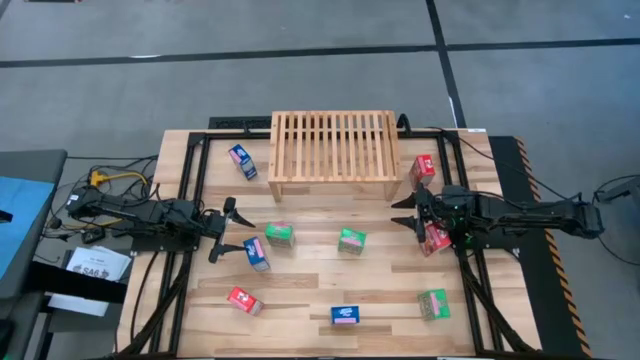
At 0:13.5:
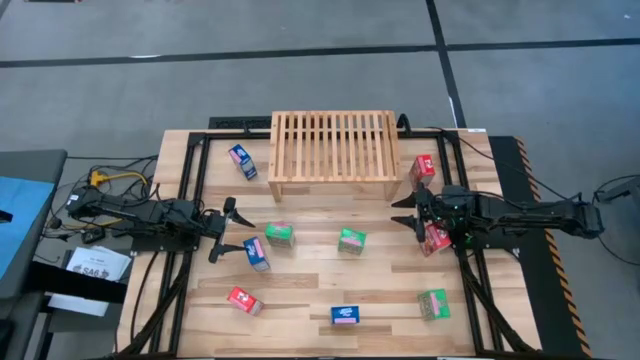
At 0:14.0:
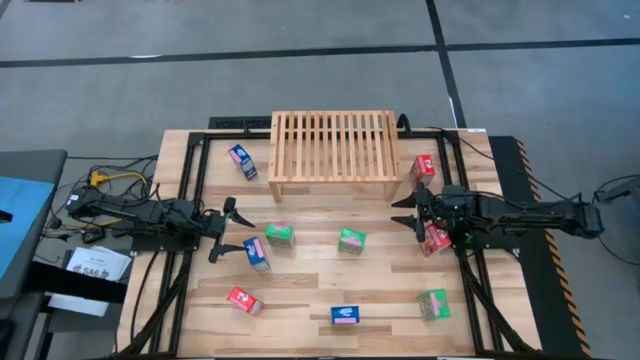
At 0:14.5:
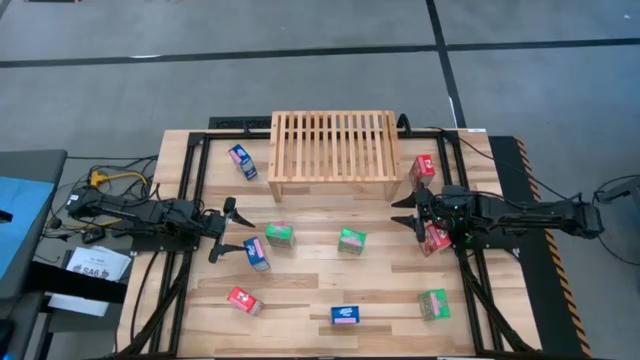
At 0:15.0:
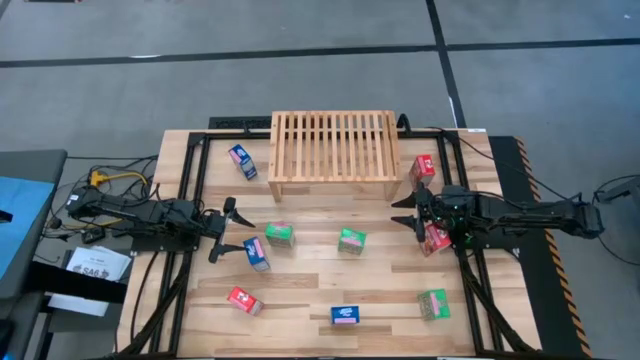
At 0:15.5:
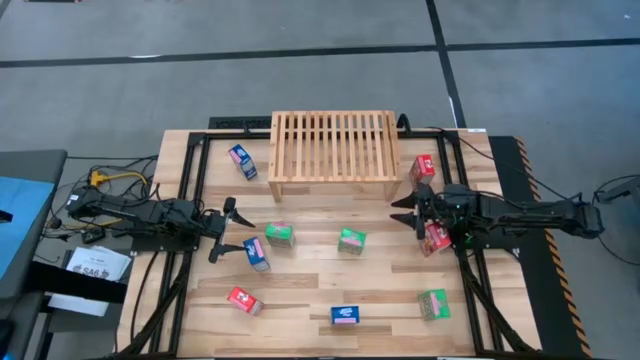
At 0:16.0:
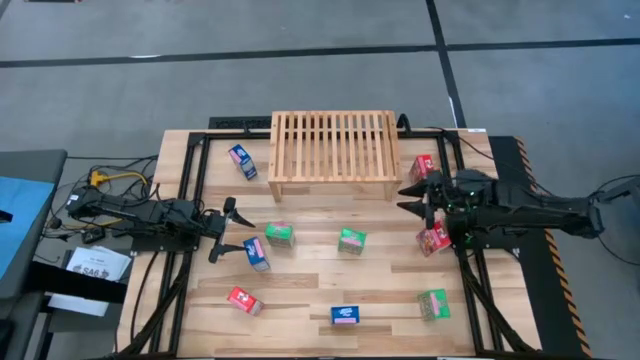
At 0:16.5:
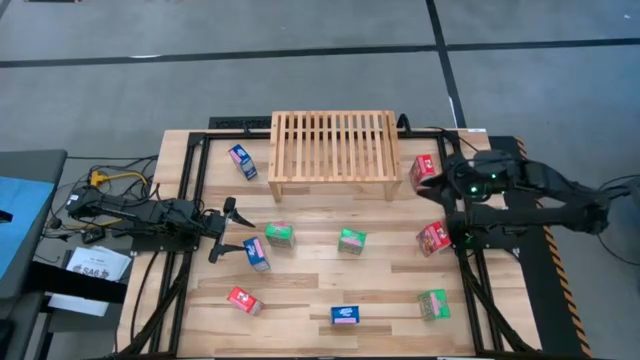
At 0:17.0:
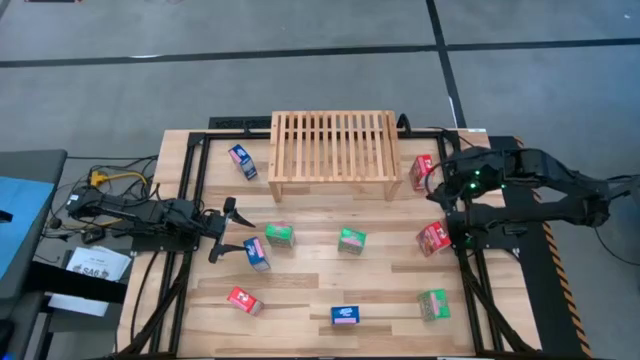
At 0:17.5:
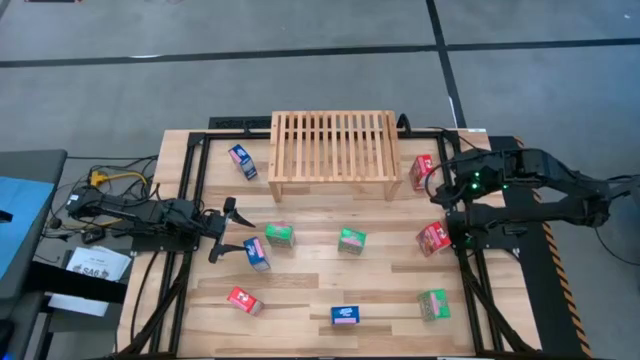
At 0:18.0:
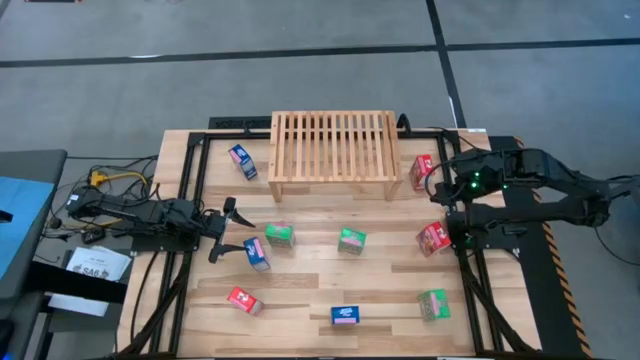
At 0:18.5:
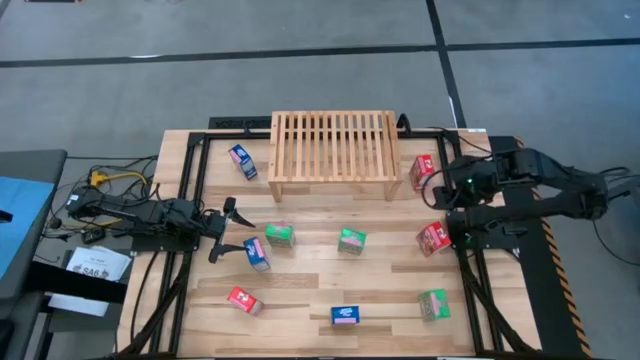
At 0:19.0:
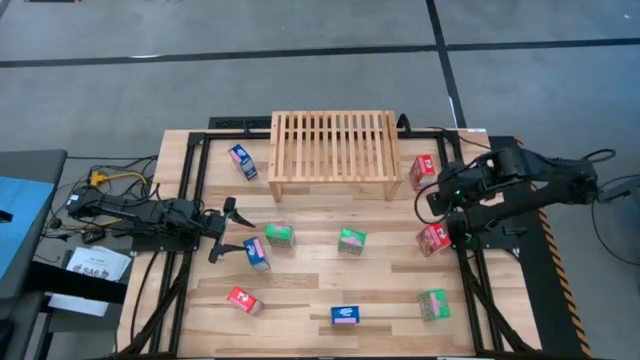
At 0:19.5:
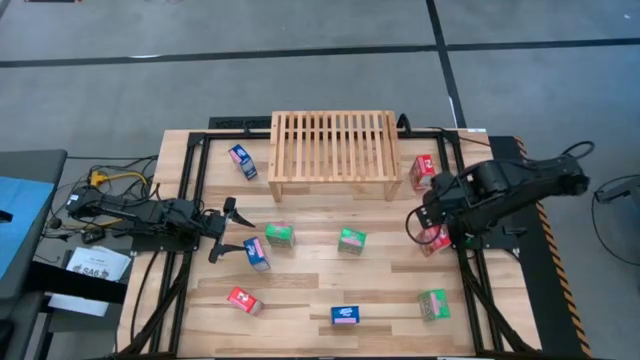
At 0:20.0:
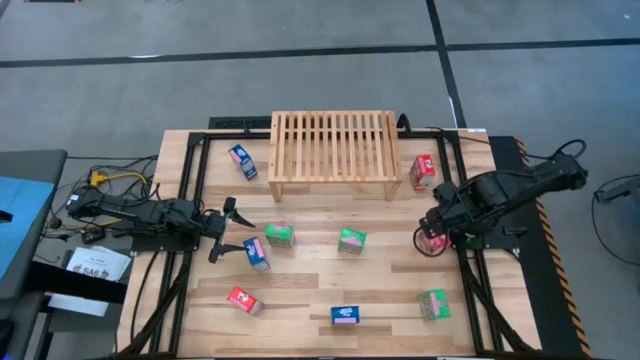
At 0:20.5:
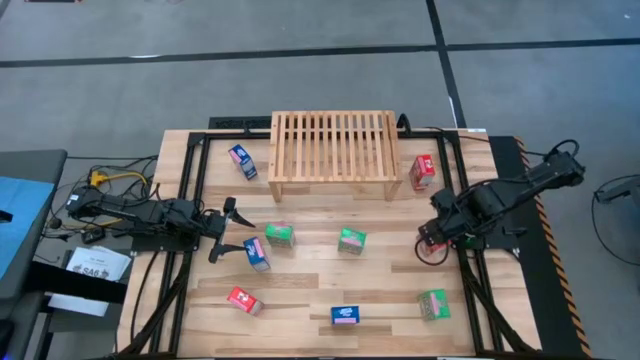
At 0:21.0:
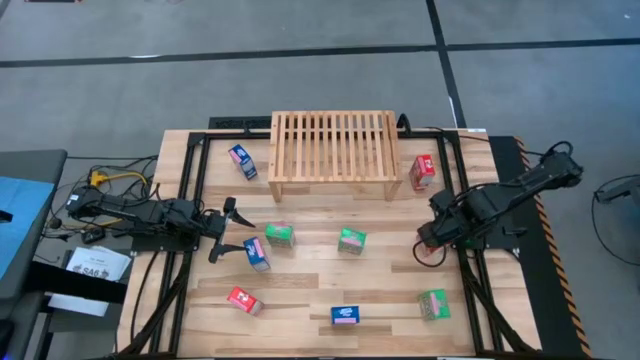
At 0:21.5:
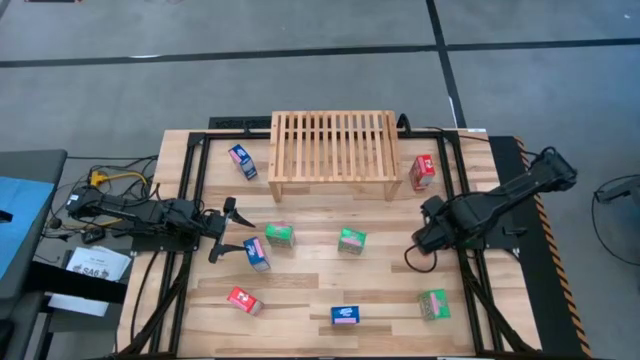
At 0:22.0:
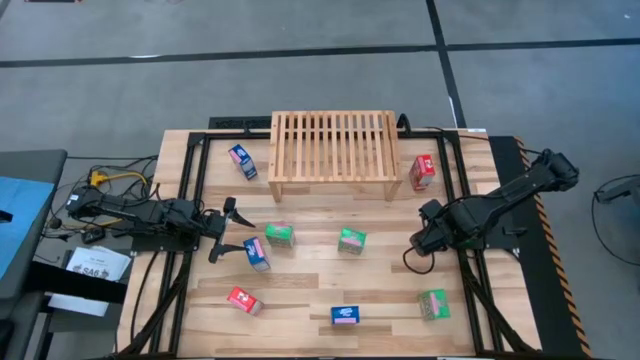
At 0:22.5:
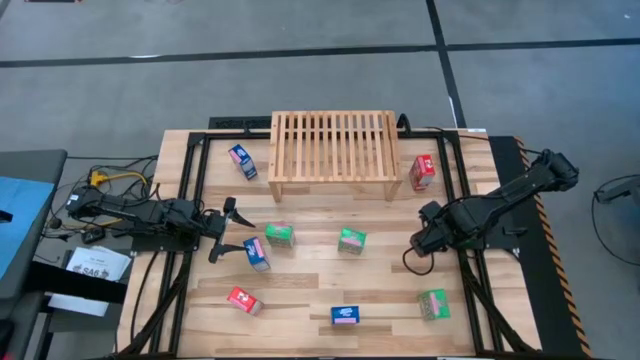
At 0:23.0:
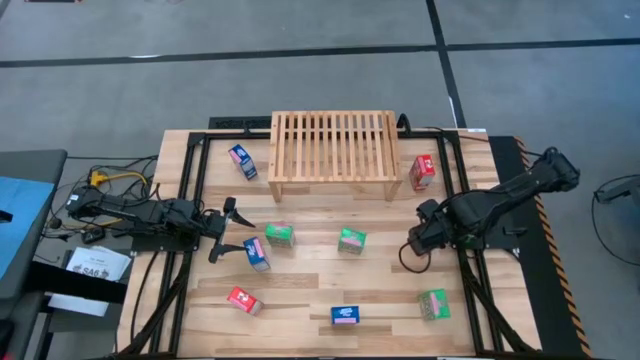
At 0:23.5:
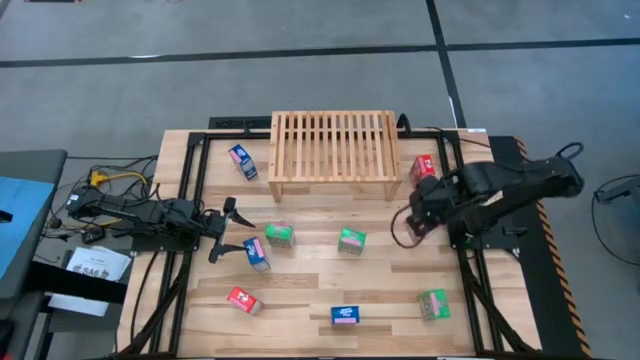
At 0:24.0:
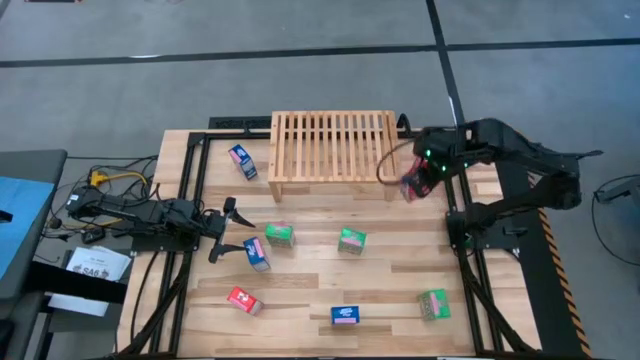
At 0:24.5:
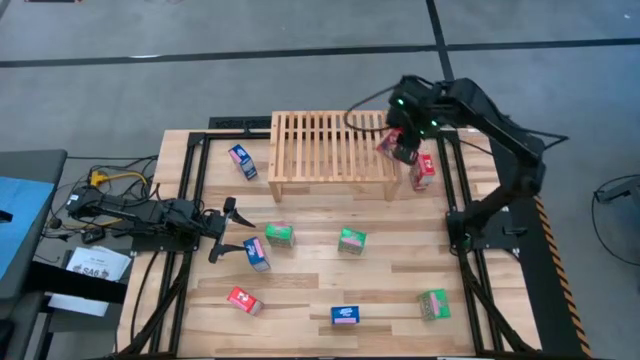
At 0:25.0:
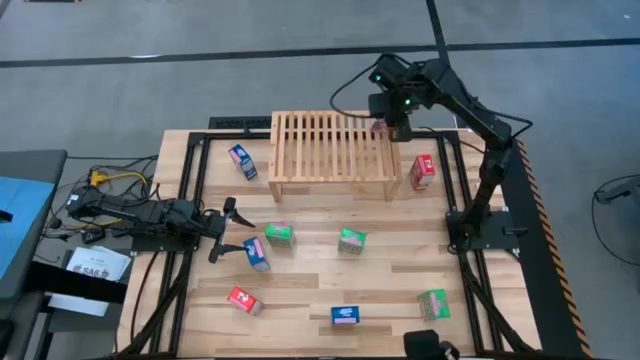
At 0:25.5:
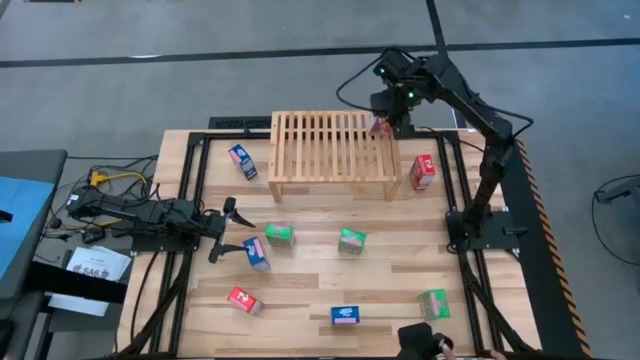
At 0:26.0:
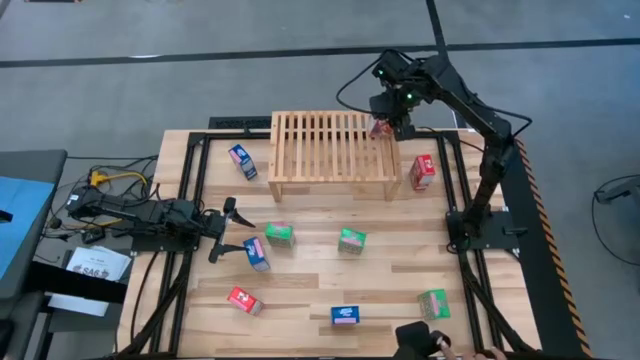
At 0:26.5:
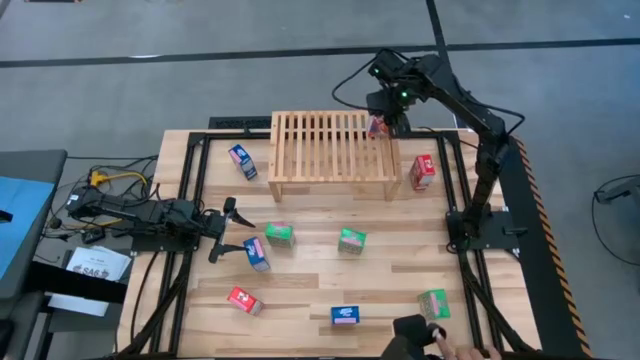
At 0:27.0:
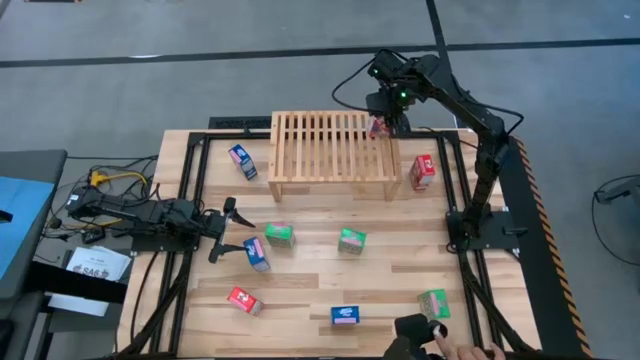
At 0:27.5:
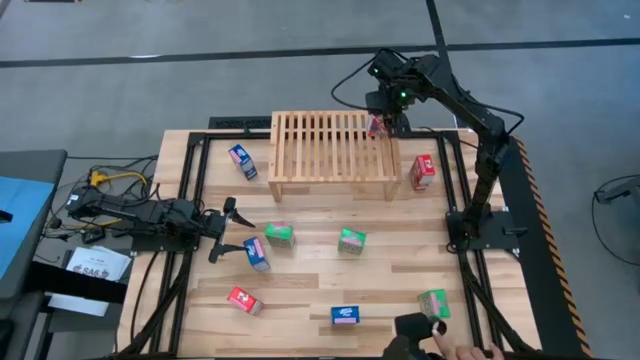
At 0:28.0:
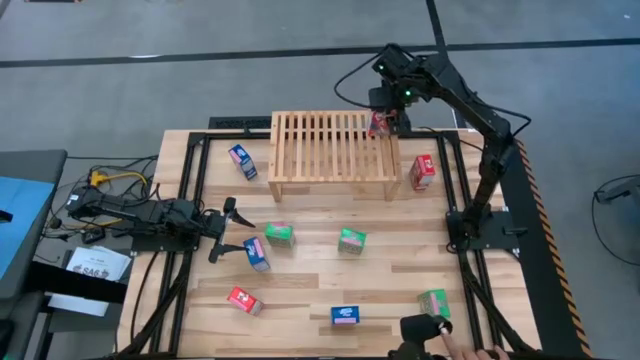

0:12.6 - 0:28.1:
Task: Stack cereal on shelf
Put the middle red cereal box on the shelf

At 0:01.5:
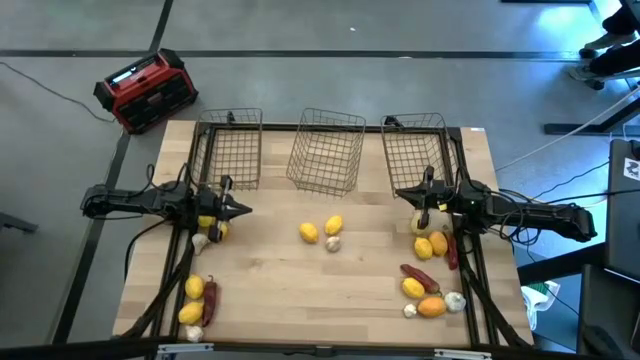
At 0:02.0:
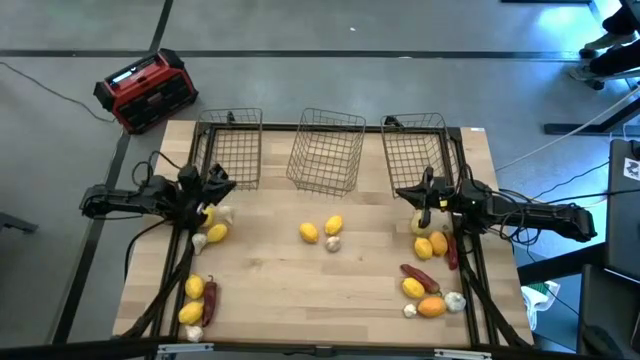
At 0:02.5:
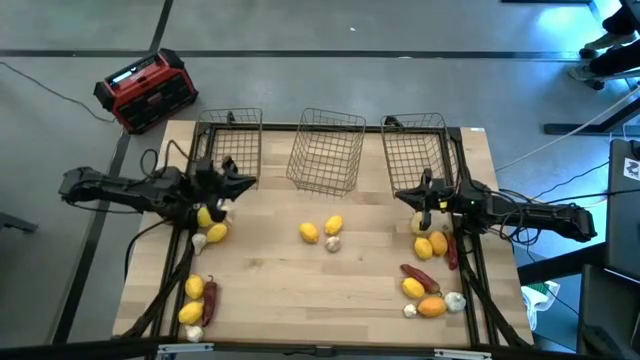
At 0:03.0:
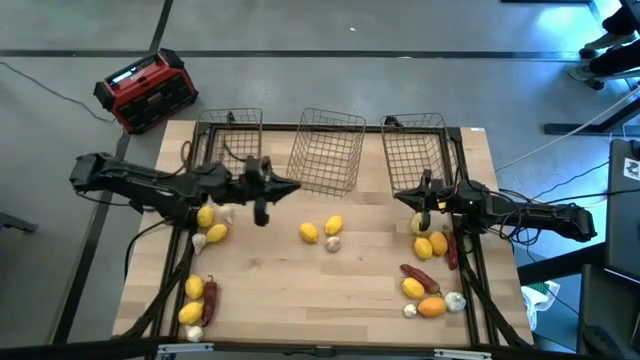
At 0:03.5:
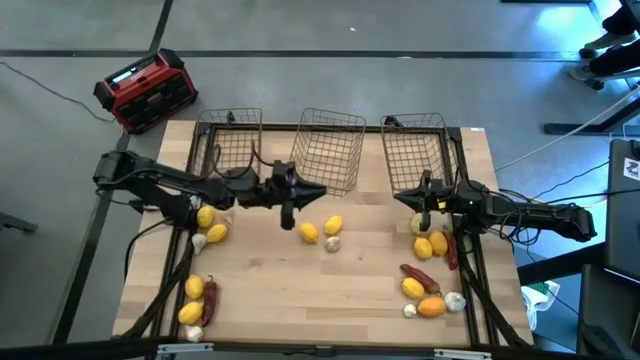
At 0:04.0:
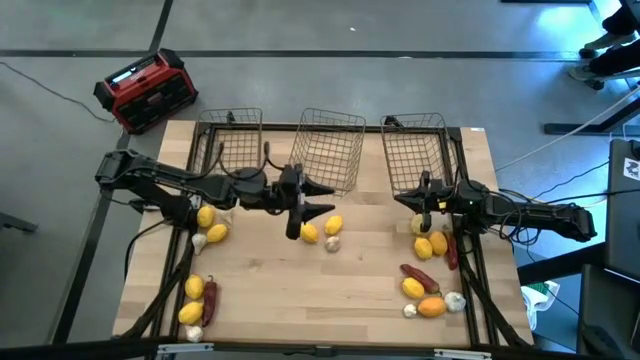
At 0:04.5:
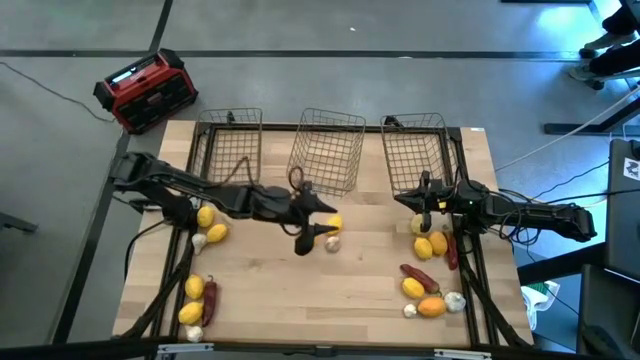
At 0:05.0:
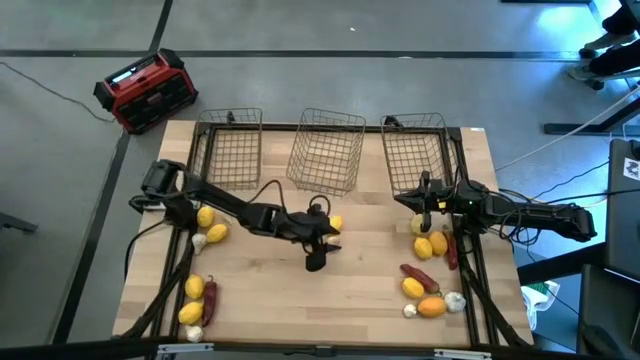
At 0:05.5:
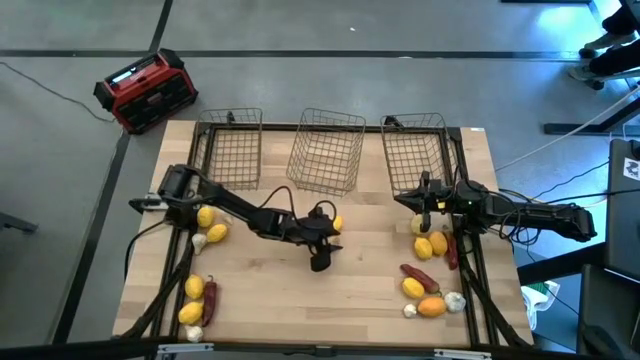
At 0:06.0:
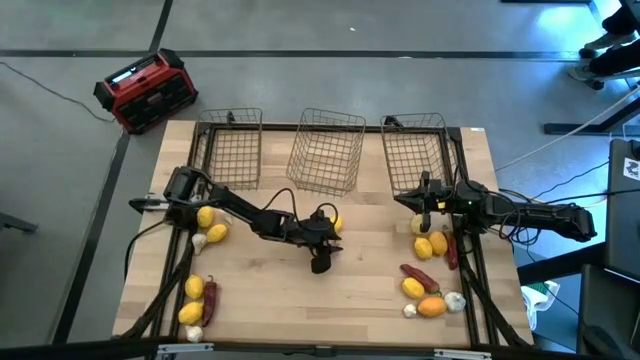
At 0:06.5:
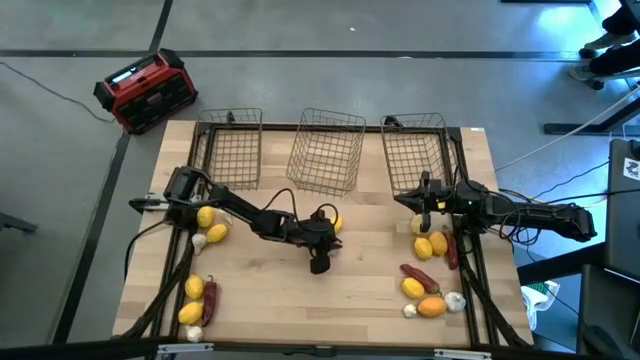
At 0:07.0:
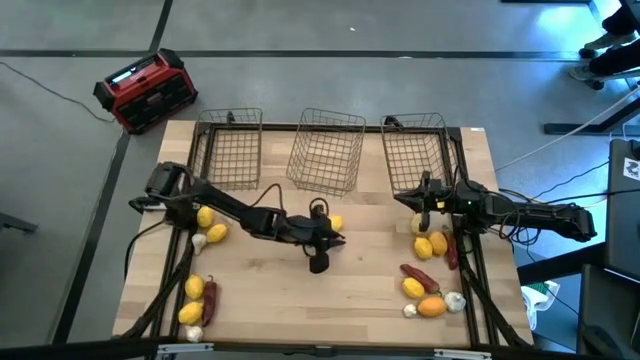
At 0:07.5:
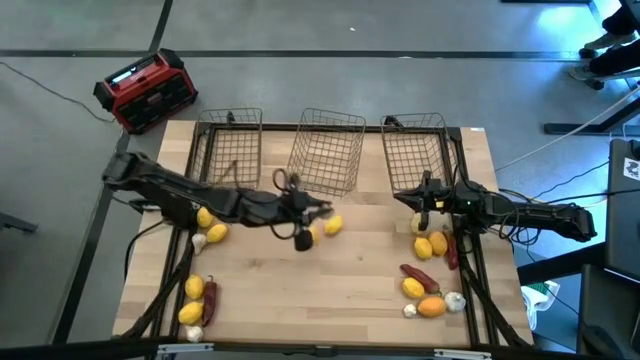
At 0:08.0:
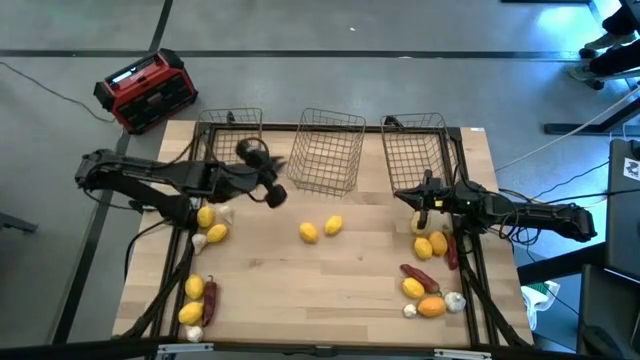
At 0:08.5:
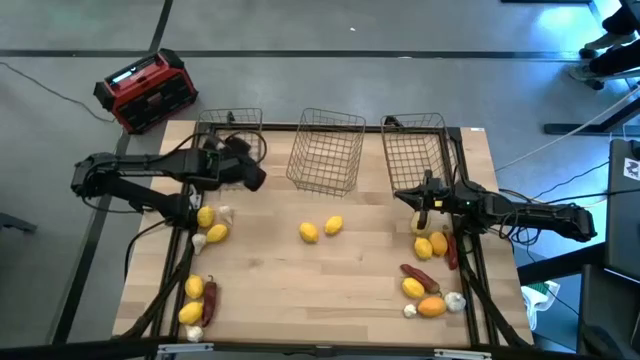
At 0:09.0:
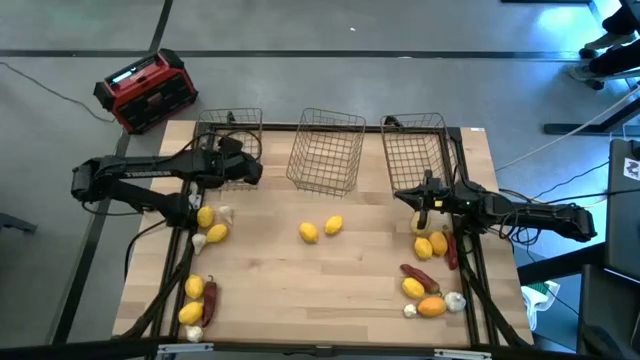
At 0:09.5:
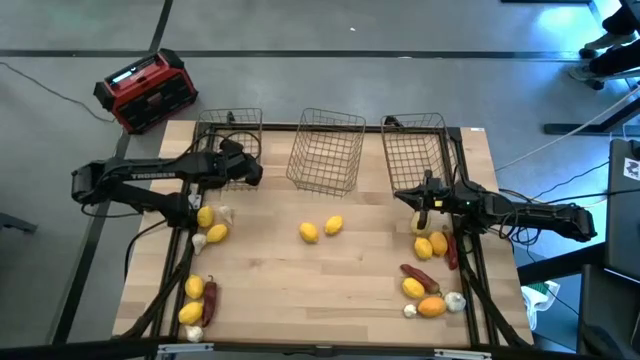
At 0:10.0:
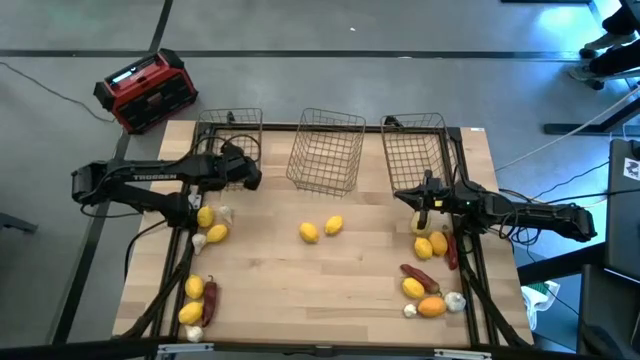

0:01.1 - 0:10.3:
Task: Sort produce into baskets
Put the garlic into the left wire basket
